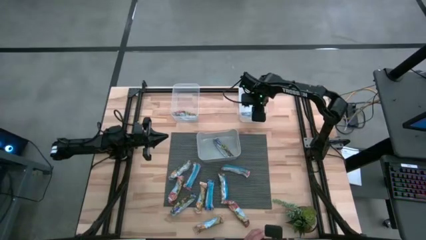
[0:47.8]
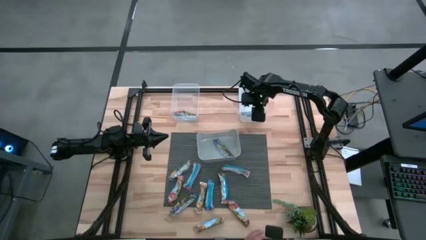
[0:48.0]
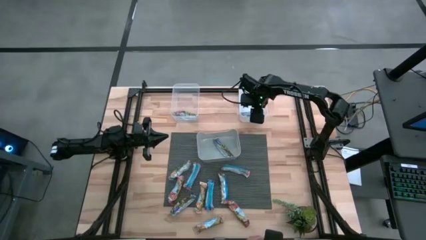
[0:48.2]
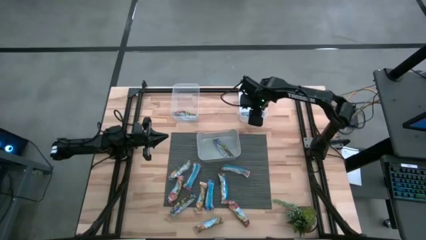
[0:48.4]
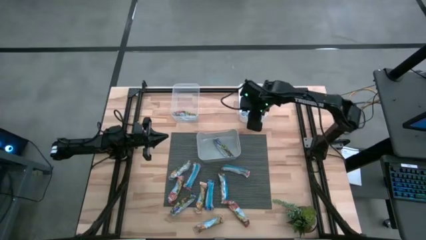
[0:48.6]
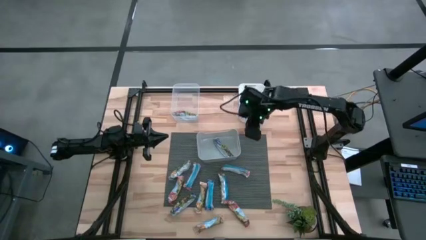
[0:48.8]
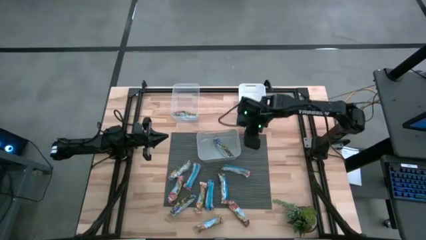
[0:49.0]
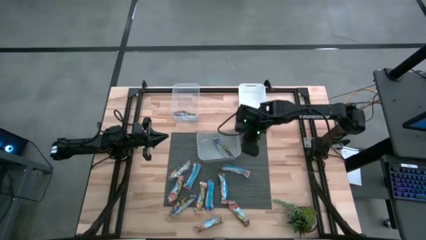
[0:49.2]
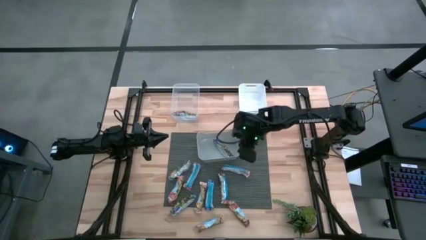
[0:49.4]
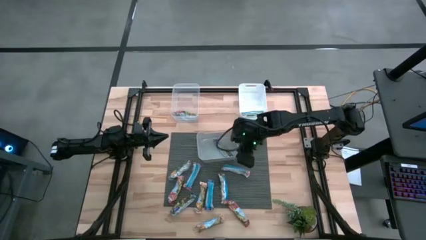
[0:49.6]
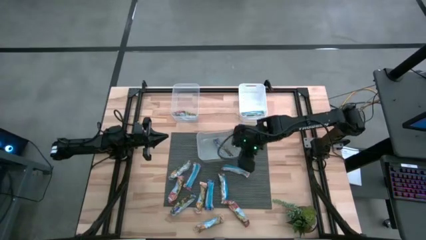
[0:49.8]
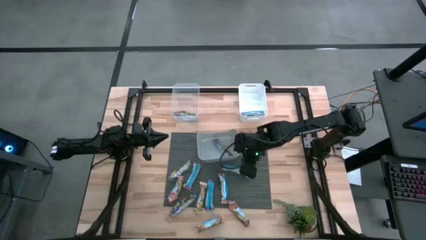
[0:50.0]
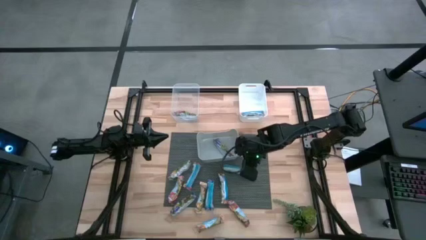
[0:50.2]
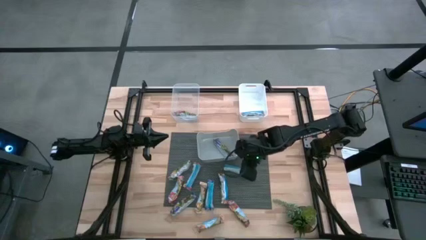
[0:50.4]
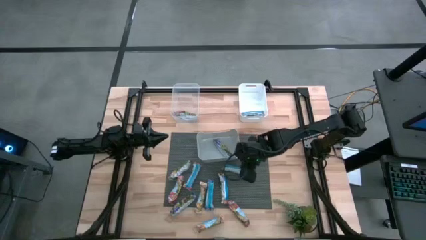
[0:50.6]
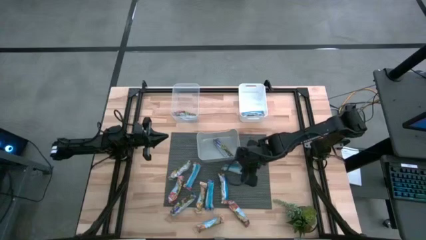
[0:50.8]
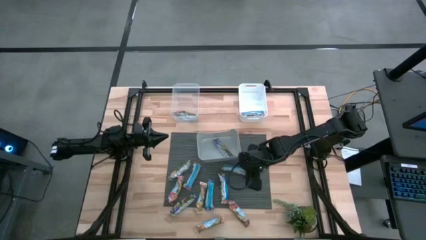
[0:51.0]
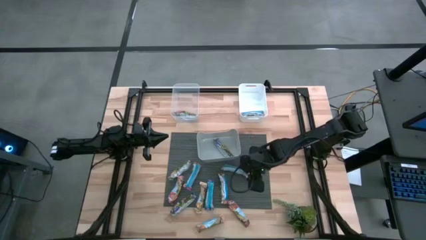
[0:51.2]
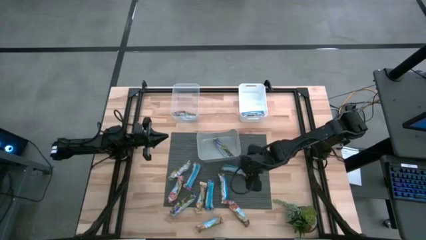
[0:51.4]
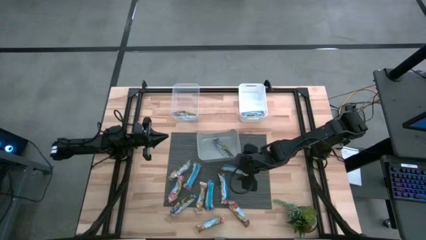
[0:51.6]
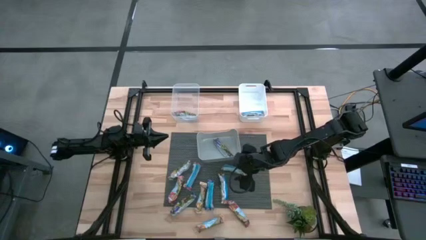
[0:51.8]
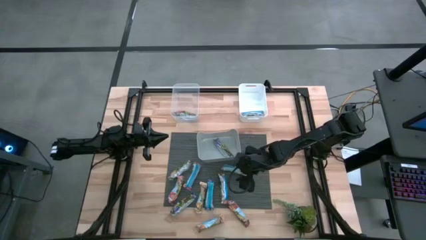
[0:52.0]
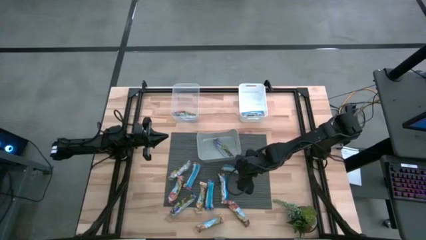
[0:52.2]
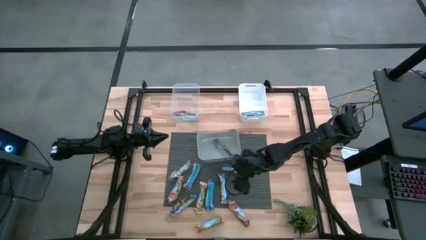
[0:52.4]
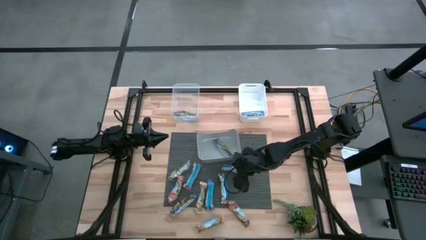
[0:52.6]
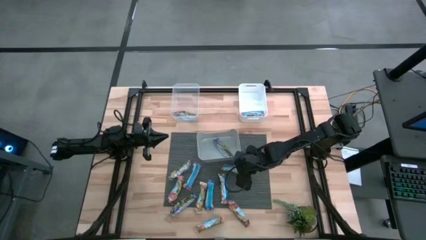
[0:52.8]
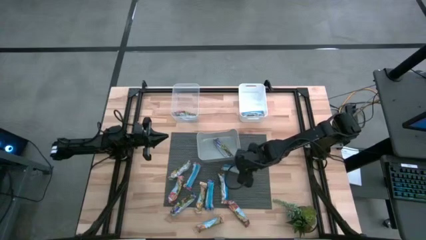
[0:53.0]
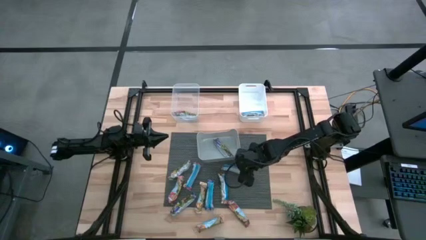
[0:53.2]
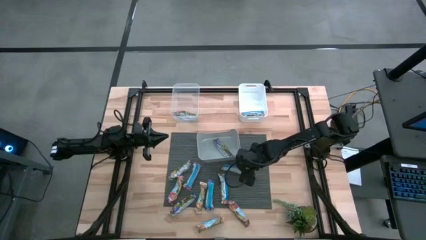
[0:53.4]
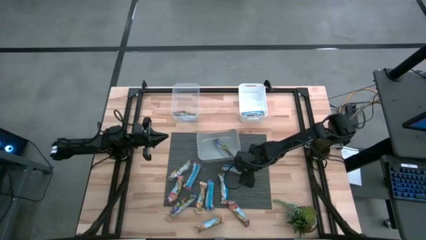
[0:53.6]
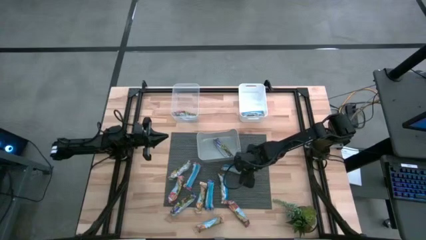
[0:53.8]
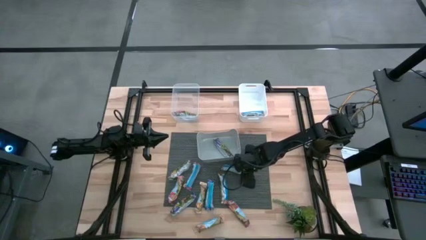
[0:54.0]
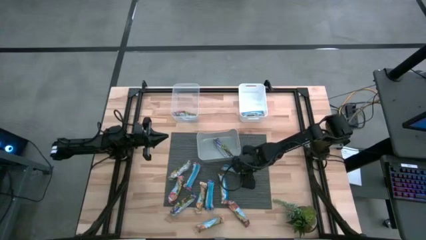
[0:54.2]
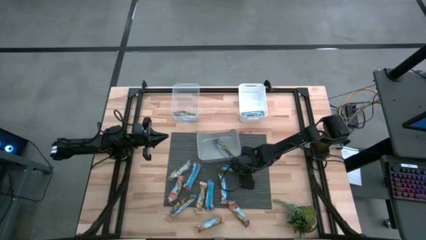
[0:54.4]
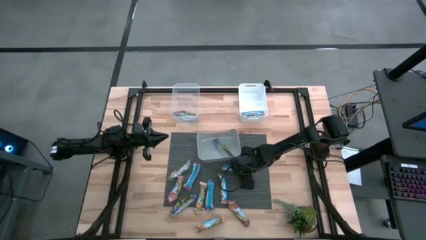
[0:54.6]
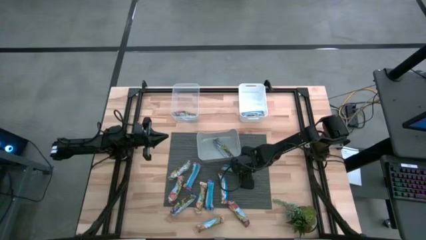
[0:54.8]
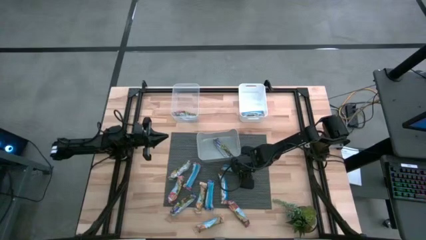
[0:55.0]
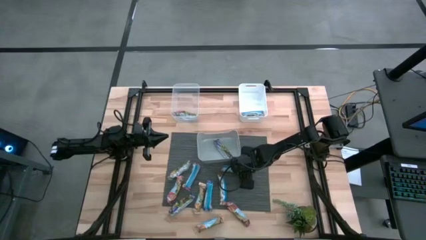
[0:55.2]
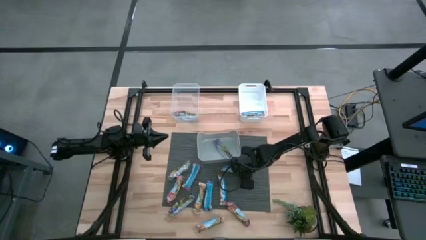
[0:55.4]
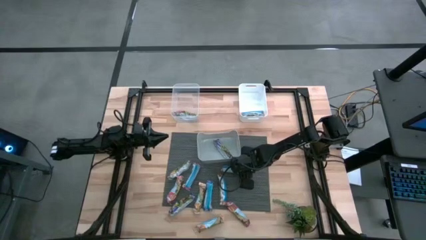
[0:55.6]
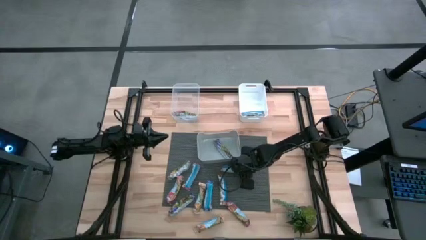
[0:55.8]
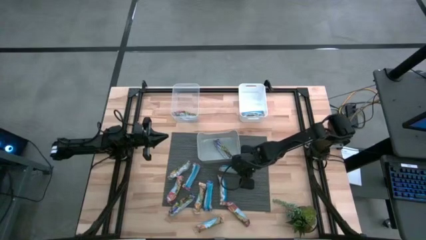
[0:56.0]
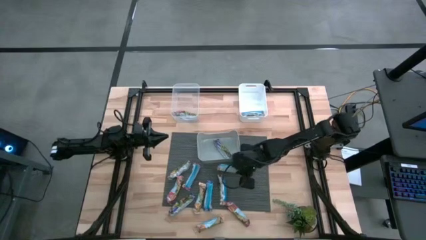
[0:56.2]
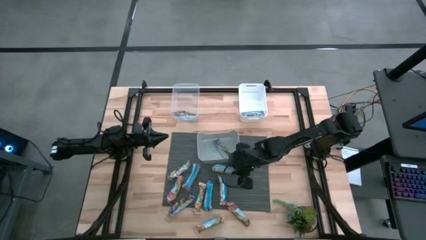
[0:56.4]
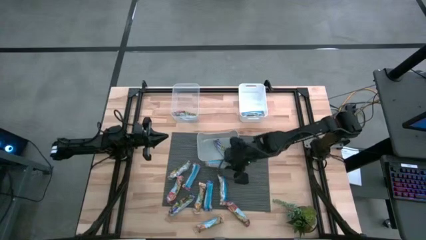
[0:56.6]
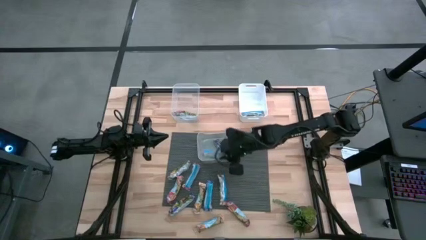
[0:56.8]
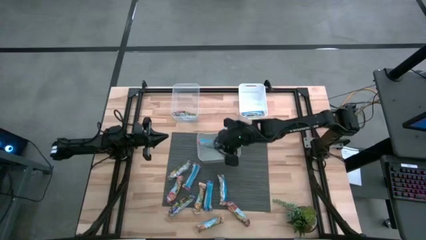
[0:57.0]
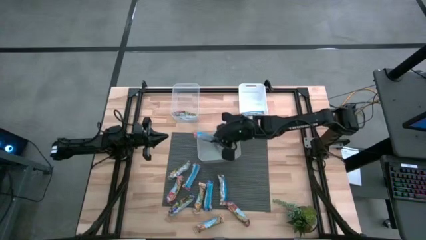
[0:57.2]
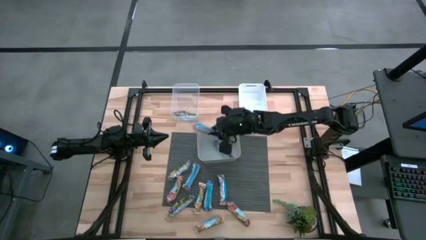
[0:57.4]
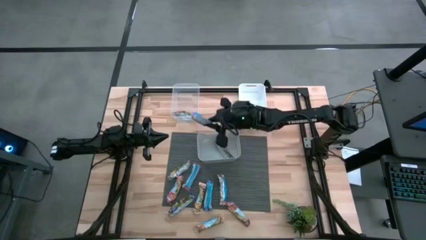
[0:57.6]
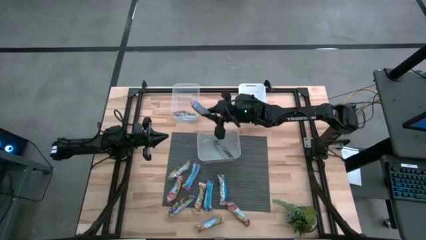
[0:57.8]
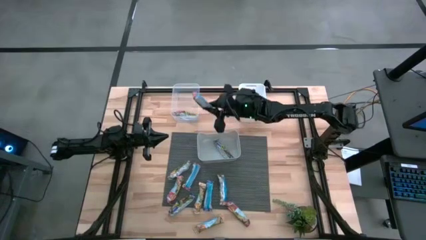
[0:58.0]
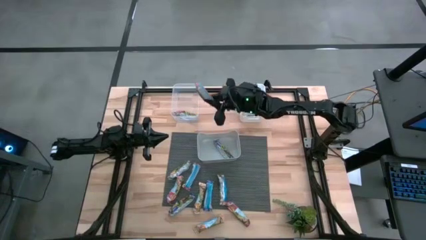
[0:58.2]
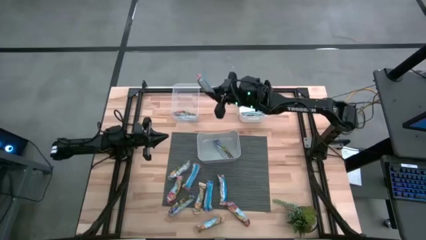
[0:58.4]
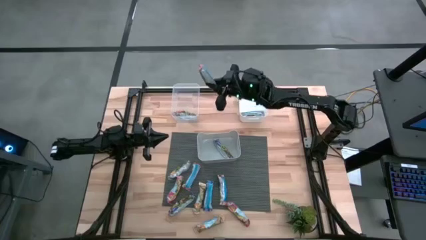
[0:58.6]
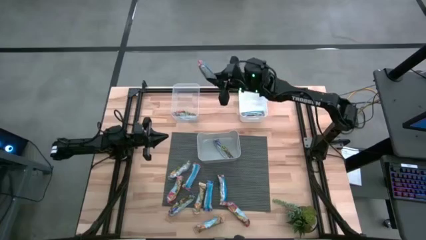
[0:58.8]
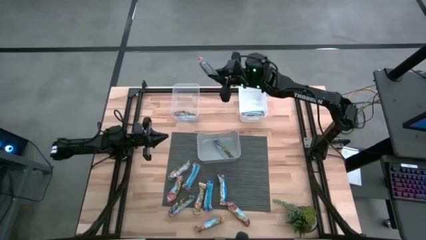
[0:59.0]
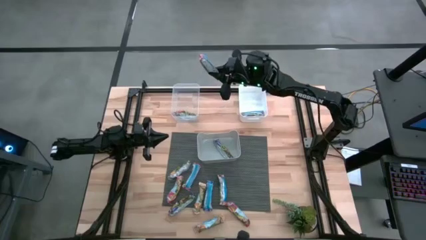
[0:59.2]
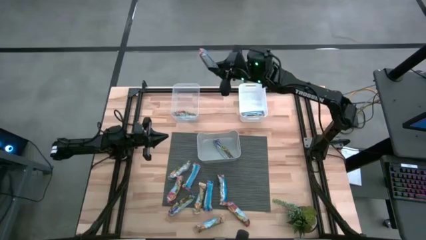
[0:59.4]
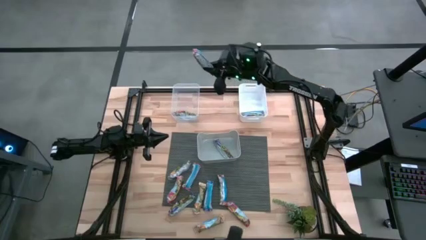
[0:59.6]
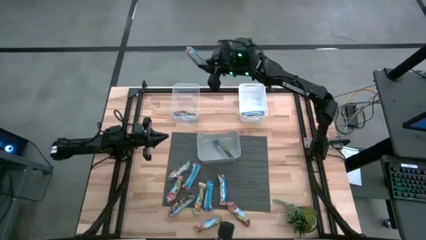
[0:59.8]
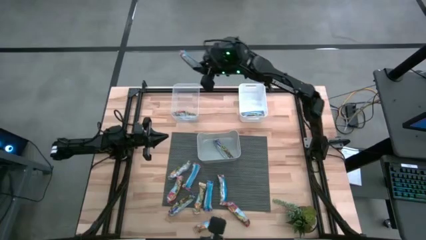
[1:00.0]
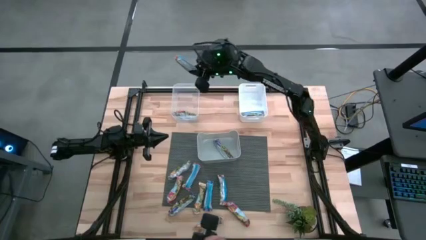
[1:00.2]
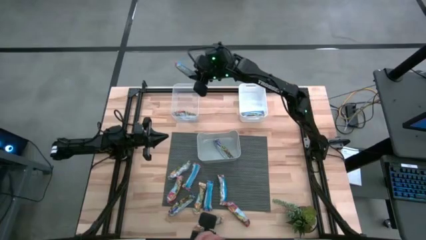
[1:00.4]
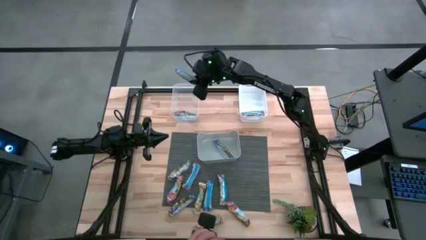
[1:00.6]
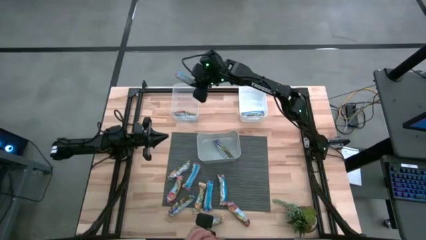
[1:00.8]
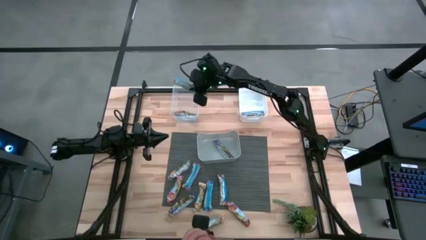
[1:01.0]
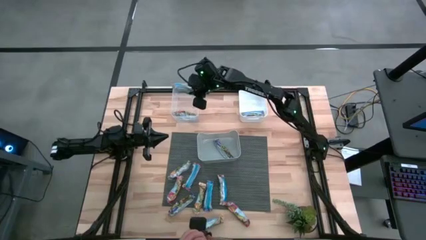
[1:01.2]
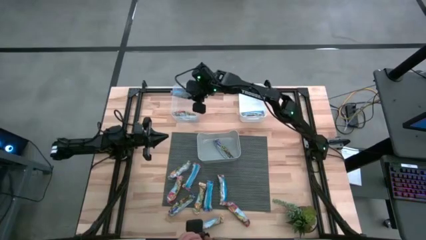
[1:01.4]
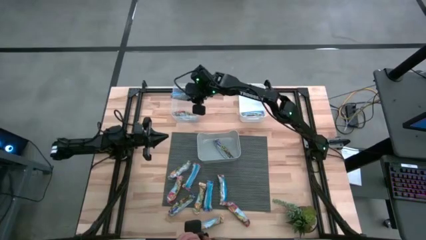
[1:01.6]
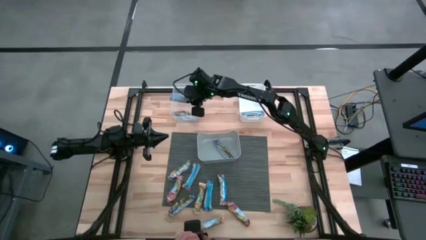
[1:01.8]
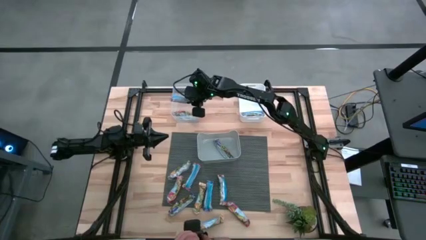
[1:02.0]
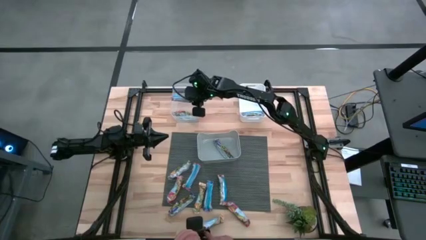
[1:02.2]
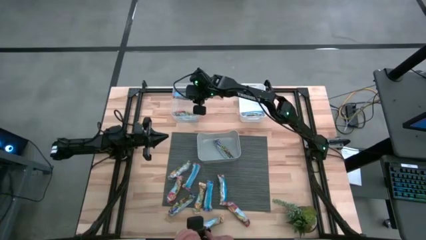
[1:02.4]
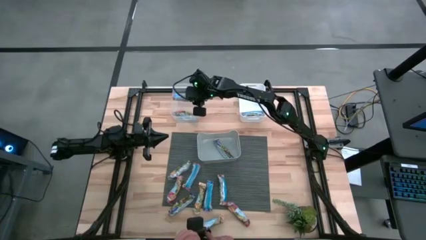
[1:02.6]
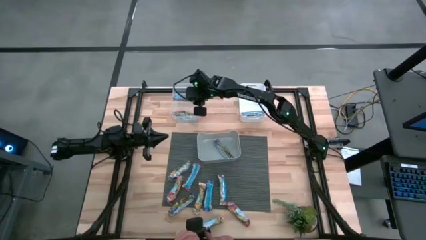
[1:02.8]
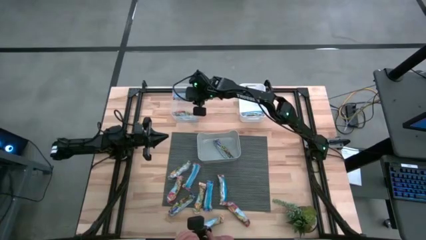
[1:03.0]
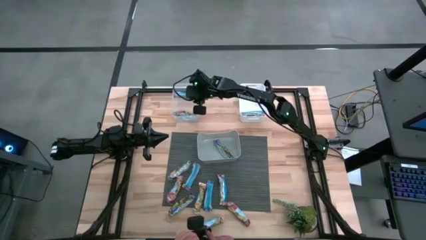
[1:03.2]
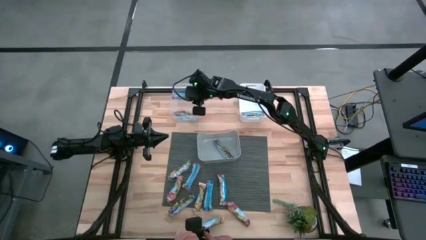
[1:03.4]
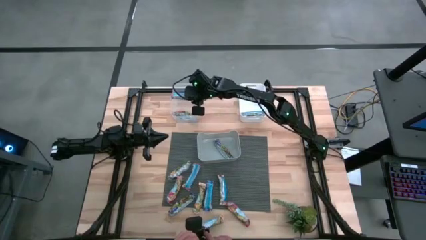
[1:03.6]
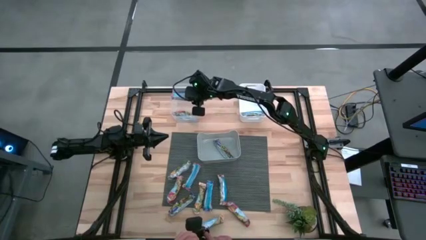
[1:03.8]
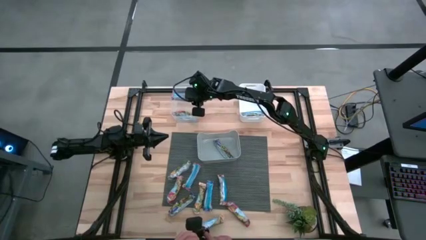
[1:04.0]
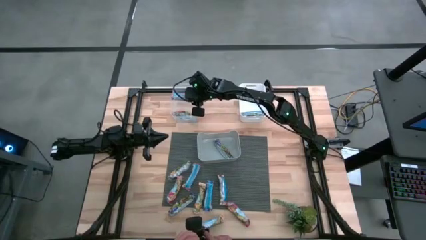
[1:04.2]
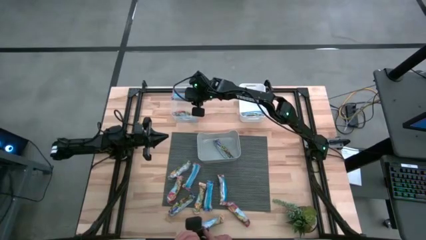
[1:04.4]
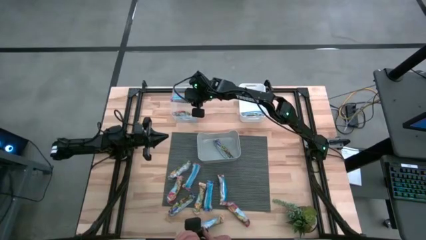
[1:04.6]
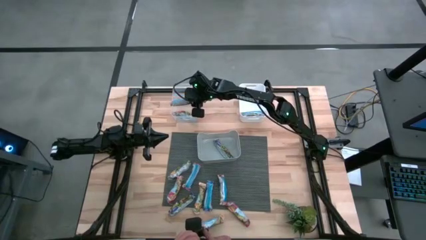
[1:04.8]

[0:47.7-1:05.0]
Task: Pick and place Granola Bars by type
Put the red granola bar into the transparent bin
